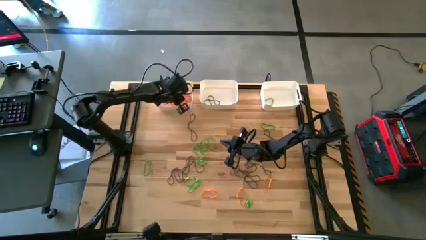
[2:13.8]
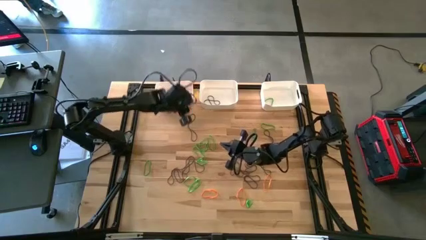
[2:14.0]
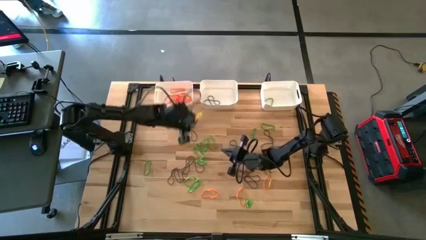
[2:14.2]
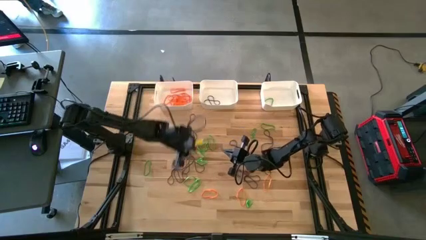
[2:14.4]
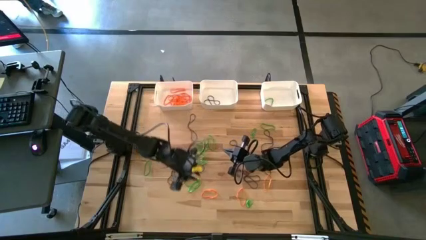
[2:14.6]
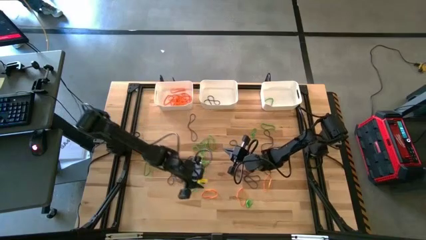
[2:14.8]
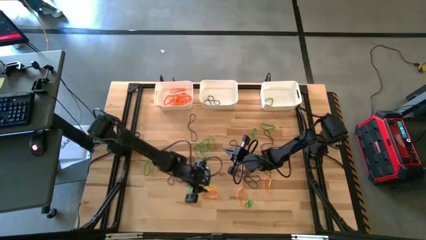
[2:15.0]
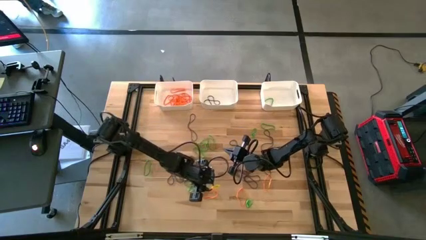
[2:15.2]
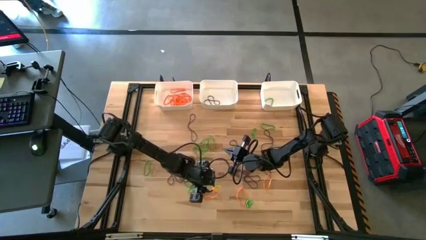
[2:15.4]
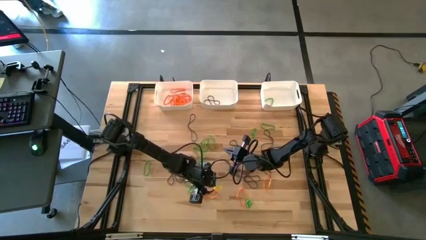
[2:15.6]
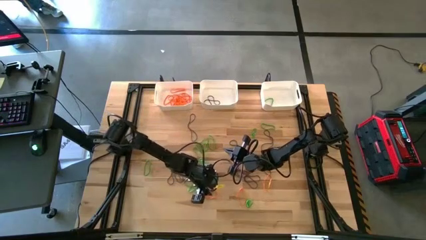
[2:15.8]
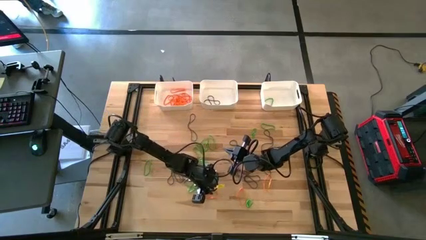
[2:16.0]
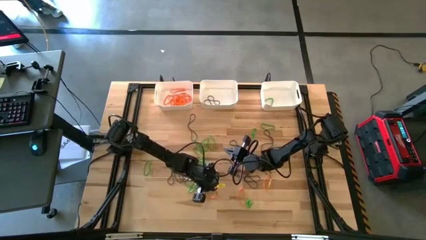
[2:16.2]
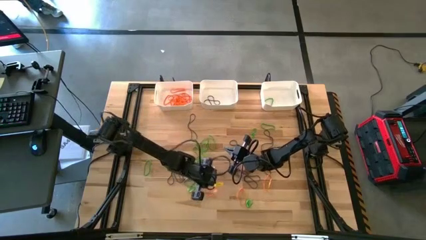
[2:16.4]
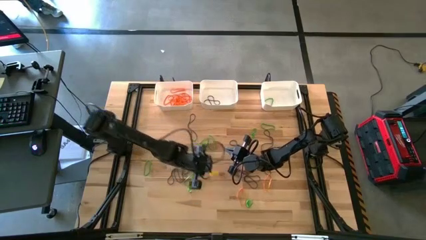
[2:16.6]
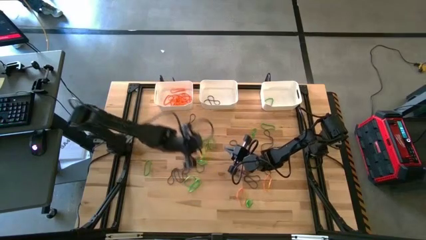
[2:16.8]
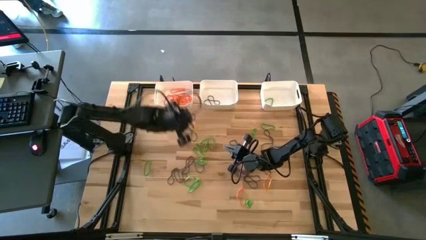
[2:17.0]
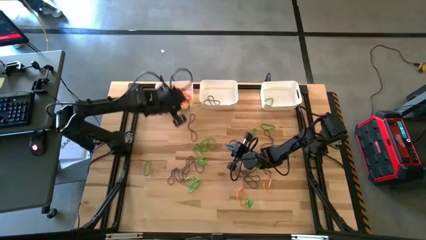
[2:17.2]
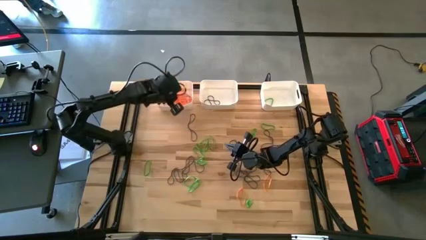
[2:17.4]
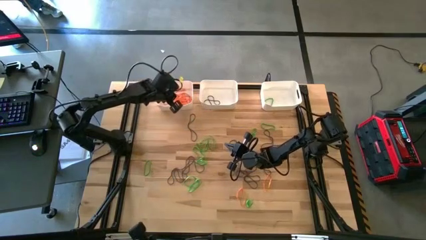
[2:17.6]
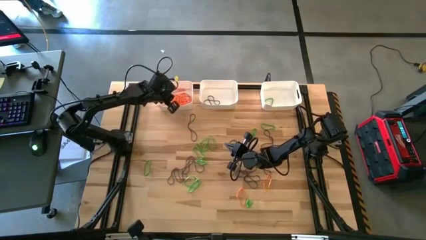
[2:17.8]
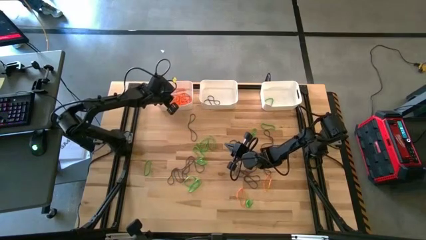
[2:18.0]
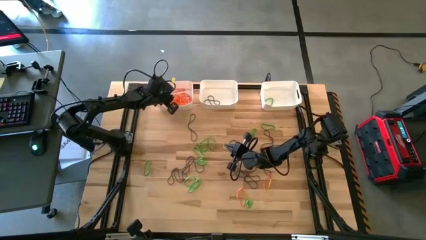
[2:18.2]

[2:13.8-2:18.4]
Task: Sort rubber bands into baskets
Put the orange rubber band into the left white bin

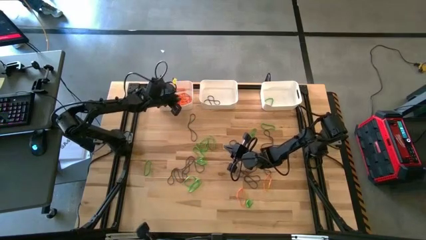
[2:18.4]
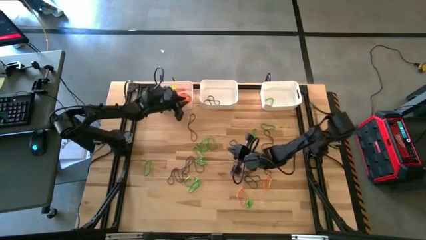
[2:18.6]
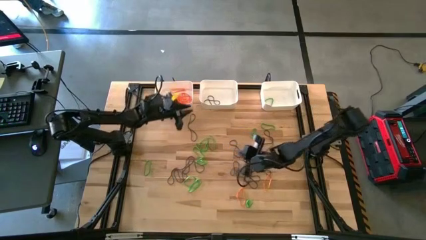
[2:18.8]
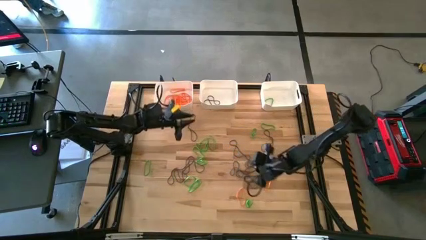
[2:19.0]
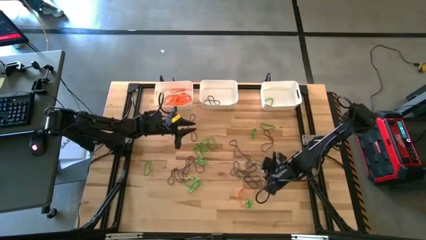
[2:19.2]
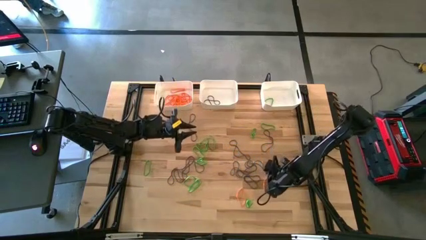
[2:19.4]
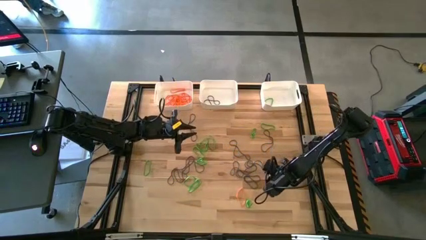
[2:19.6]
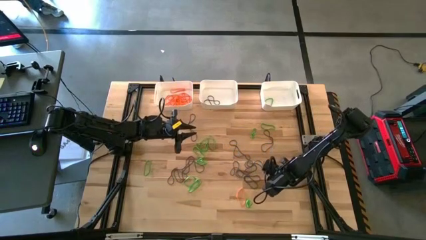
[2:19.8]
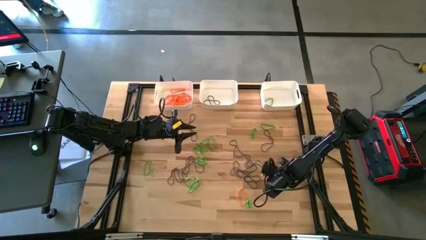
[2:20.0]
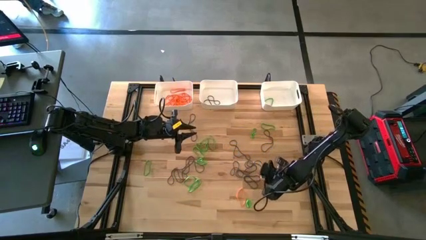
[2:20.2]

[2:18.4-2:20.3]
Put the orange rubber band into the left white bin

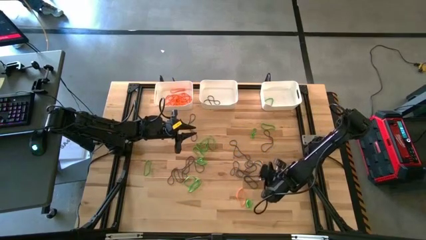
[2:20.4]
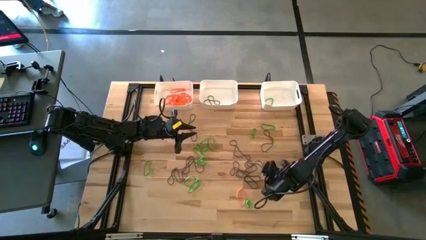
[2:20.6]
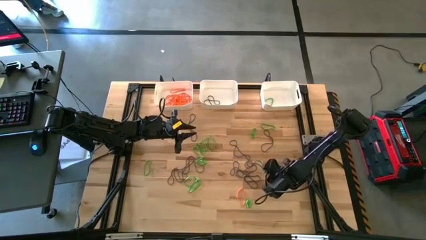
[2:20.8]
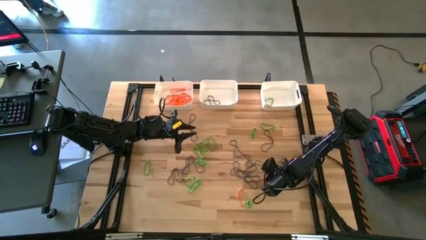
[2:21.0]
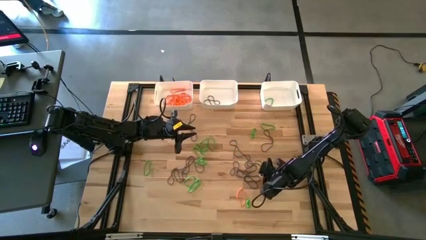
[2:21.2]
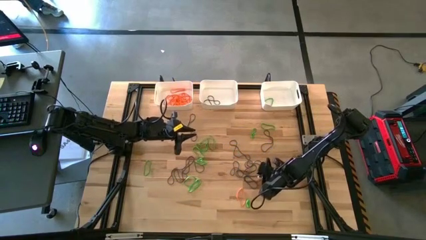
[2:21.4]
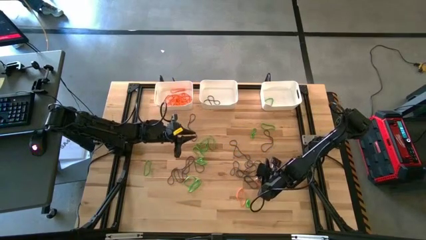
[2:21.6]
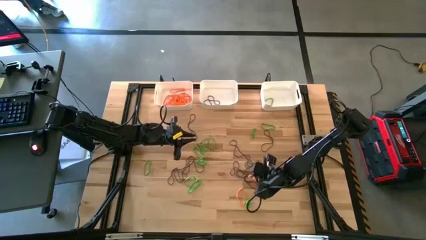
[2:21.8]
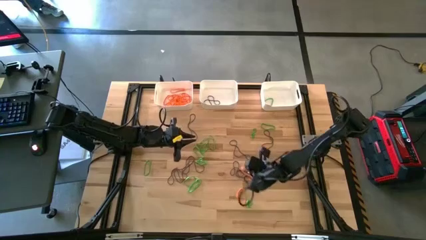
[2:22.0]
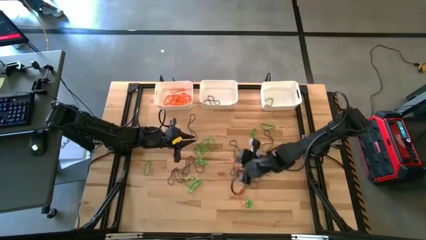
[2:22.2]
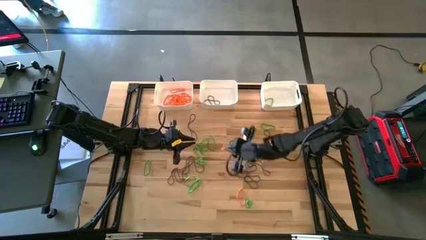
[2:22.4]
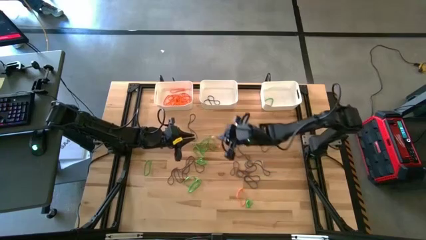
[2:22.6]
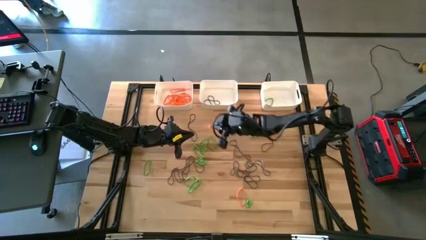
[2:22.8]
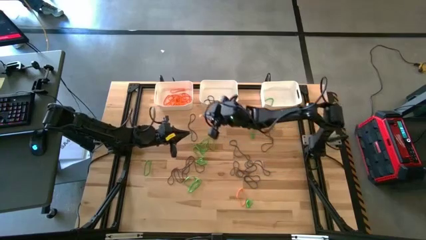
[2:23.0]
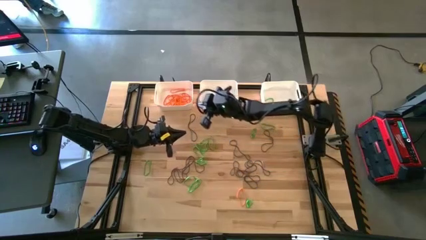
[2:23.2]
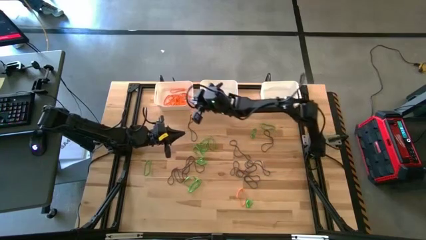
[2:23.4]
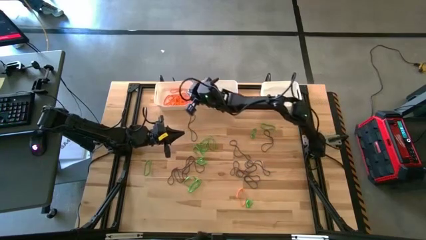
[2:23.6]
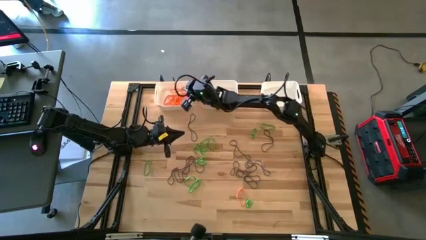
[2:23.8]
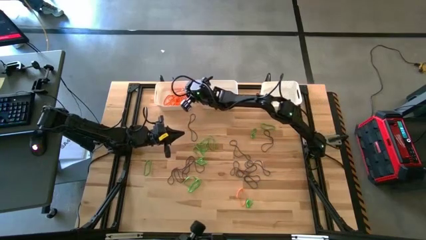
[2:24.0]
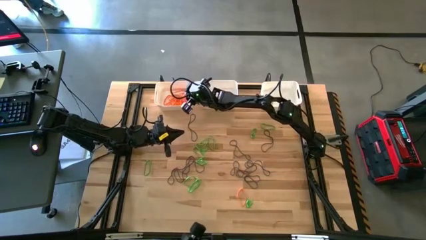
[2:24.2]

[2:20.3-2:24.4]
Put the orange rubber band into the left white bin

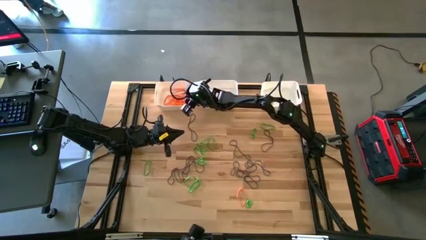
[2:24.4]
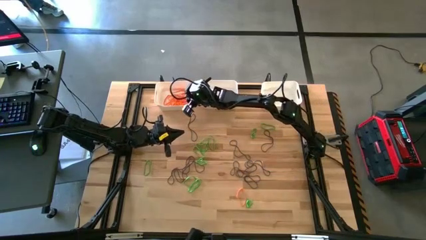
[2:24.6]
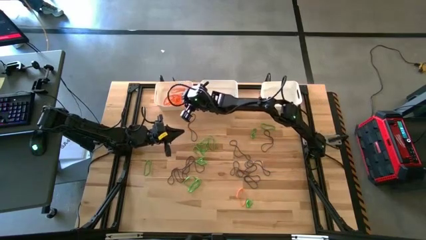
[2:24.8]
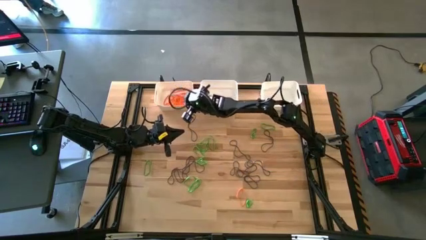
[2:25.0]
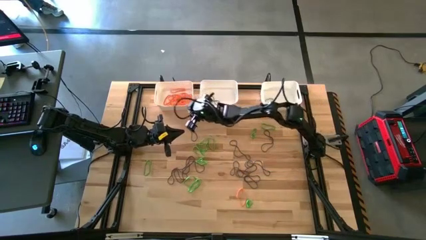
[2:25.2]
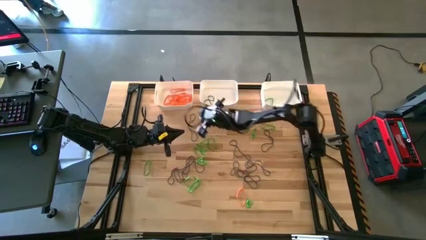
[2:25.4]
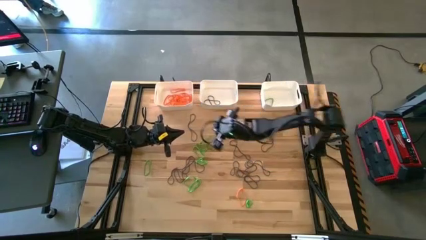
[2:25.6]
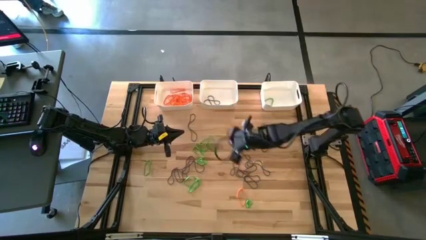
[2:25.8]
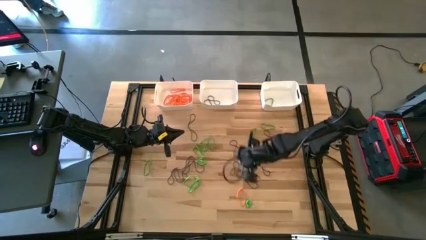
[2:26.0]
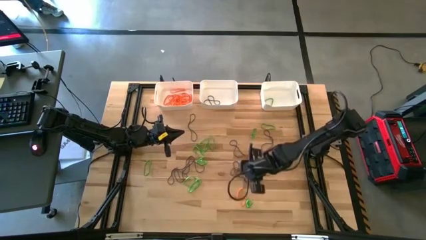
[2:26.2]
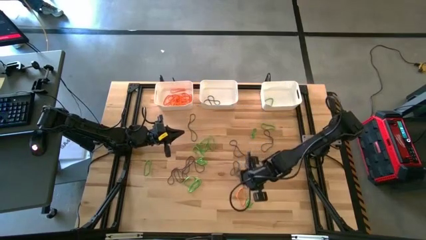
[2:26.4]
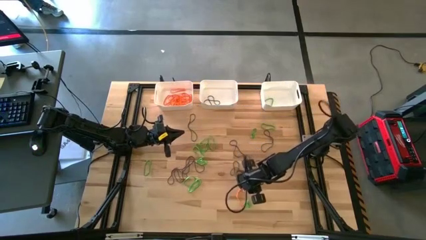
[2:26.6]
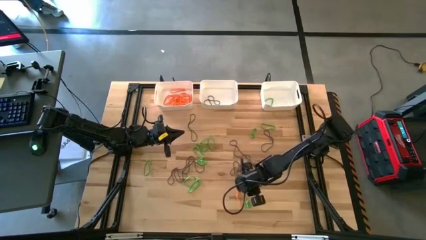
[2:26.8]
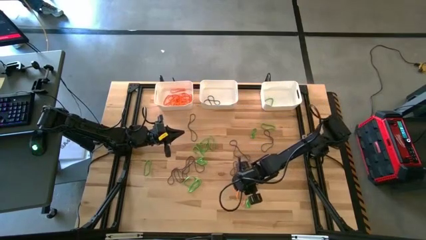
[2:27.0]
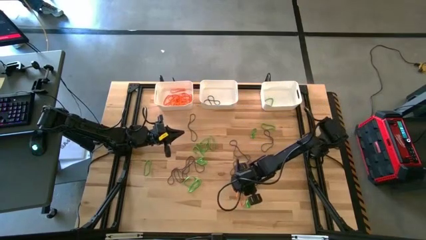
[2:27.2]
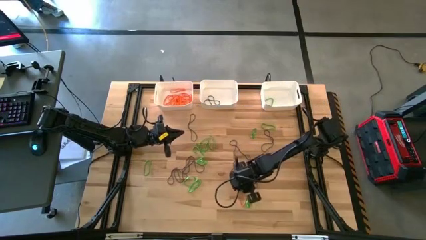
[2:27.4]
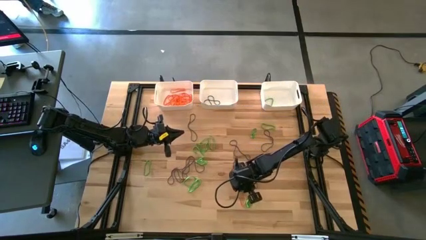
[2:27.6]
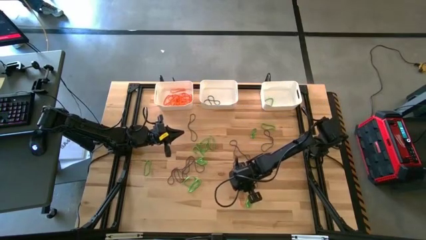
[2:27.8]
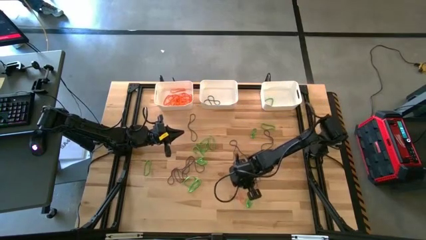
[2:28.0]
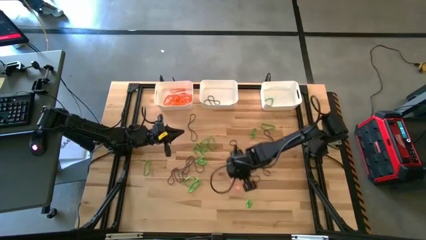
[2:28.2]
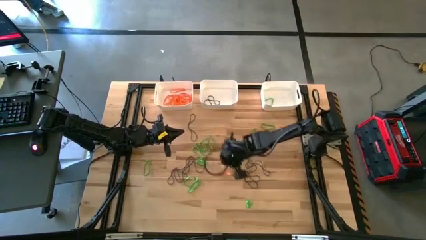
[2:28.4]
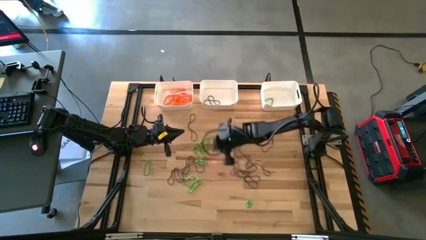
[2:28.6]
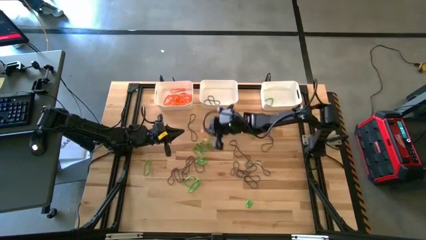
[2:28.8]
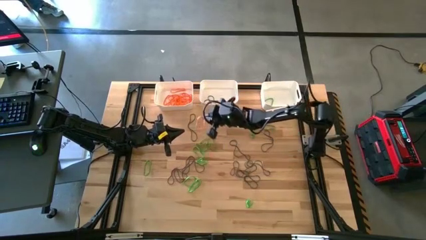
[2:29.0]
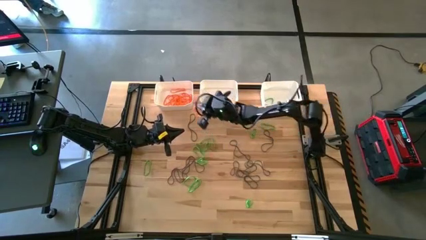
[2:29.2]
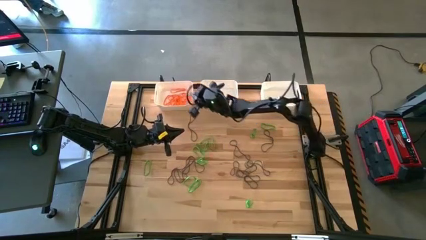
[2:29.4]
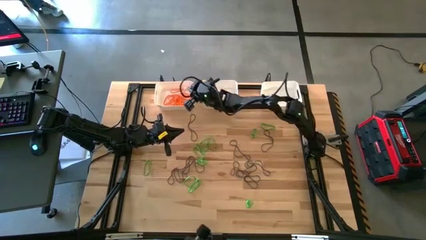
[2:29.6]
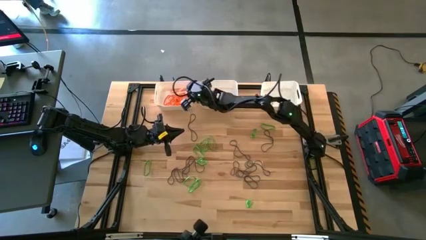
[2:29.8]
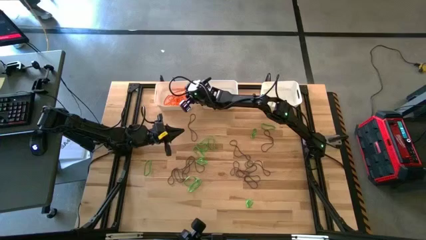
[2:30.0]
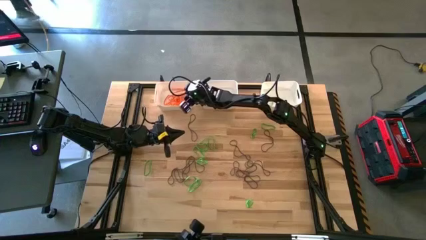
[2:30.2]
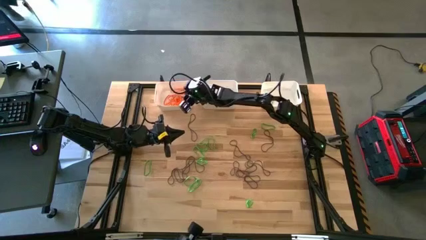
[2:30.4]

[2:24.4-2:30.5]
Put the orange rubber band into the left white bin
